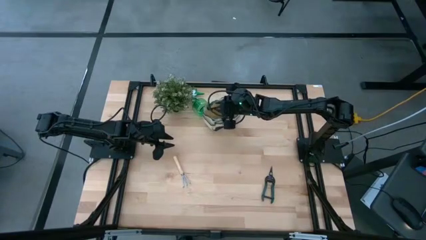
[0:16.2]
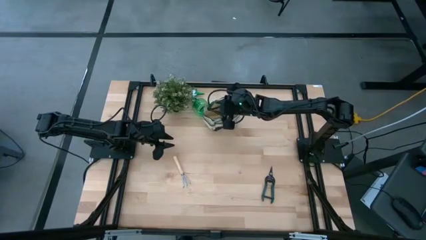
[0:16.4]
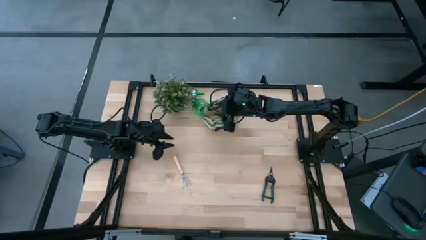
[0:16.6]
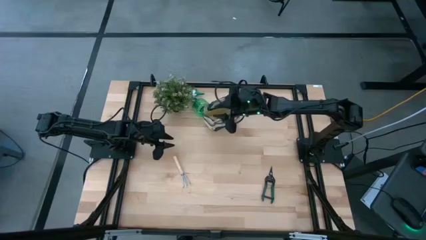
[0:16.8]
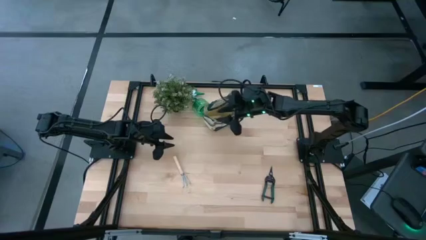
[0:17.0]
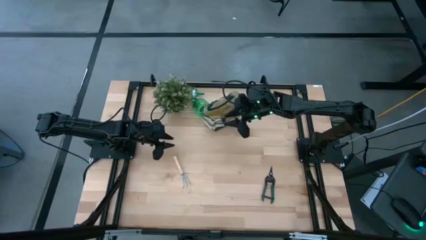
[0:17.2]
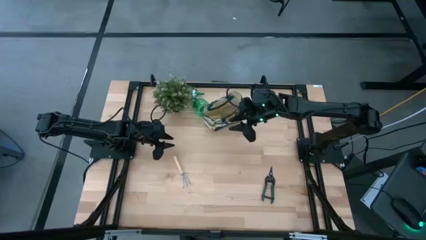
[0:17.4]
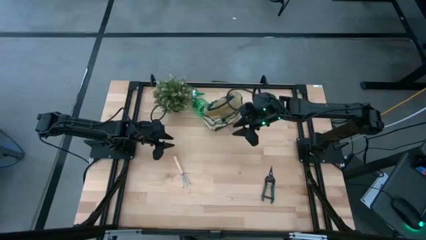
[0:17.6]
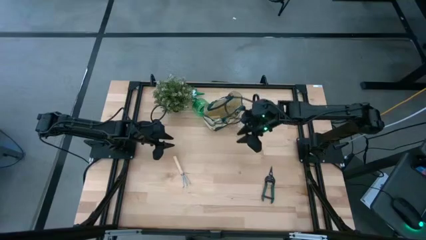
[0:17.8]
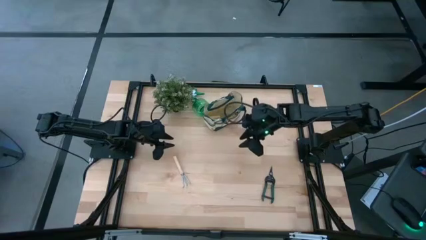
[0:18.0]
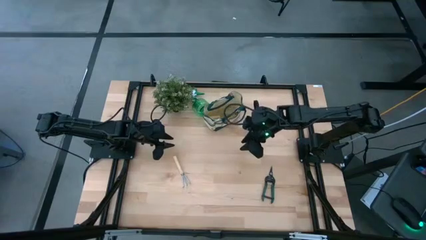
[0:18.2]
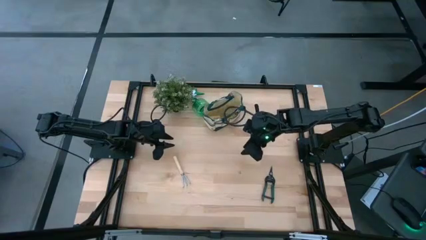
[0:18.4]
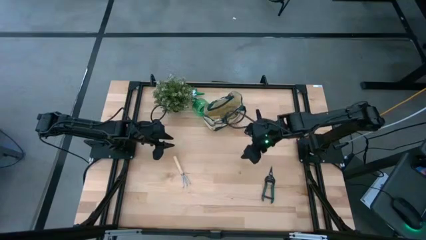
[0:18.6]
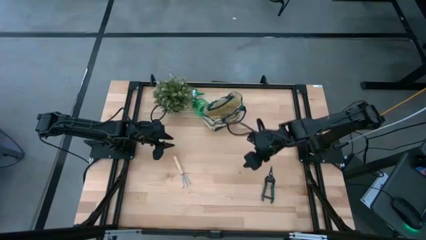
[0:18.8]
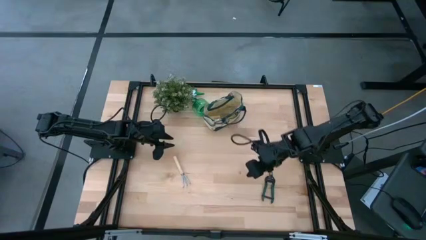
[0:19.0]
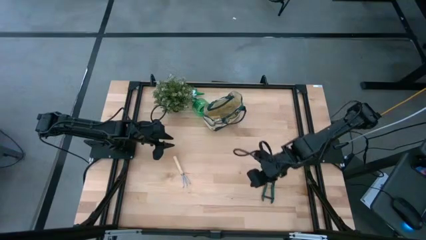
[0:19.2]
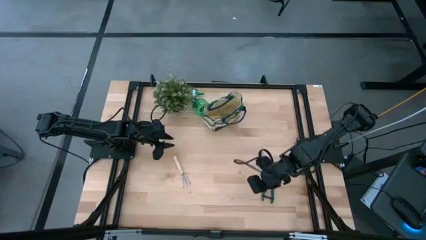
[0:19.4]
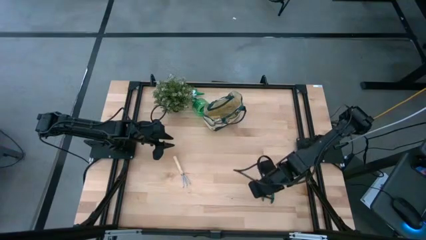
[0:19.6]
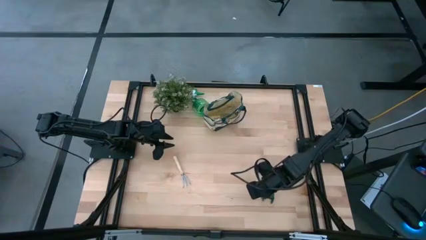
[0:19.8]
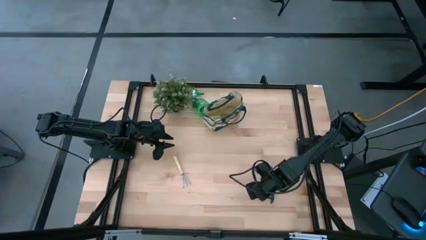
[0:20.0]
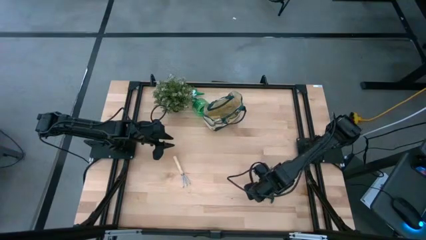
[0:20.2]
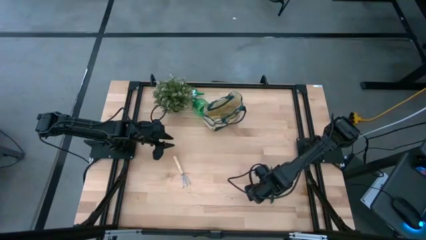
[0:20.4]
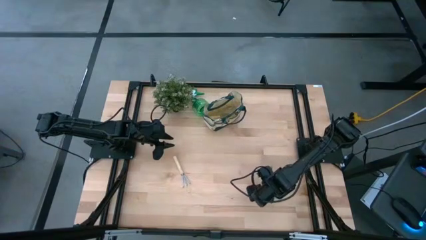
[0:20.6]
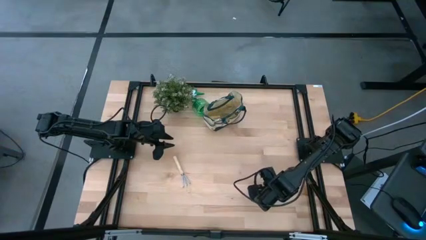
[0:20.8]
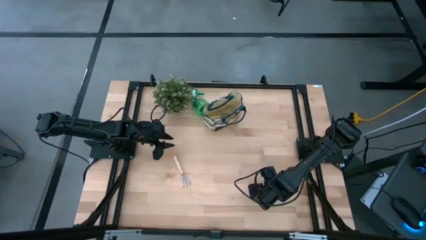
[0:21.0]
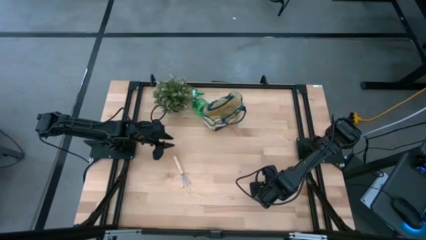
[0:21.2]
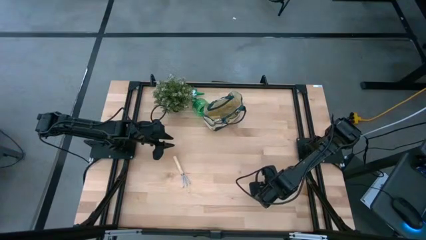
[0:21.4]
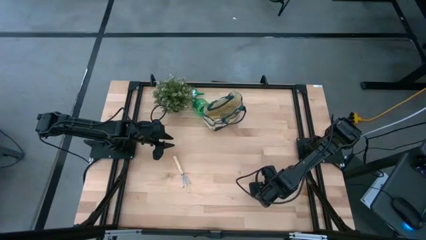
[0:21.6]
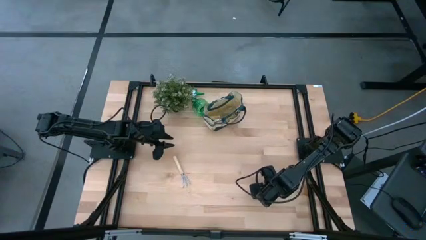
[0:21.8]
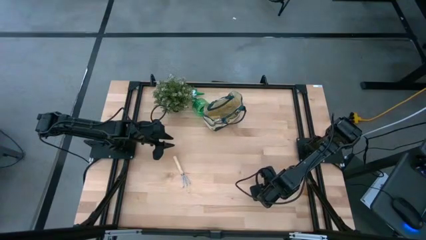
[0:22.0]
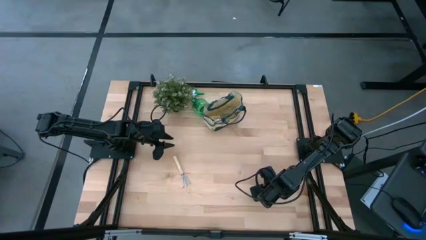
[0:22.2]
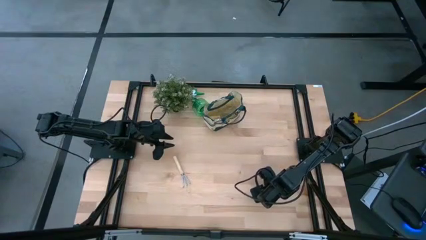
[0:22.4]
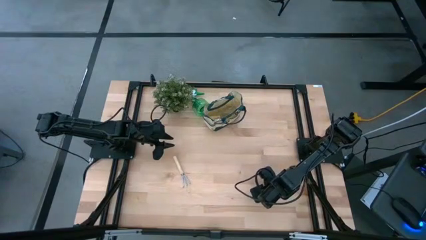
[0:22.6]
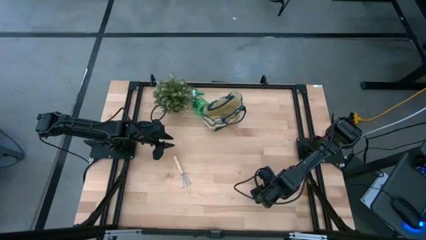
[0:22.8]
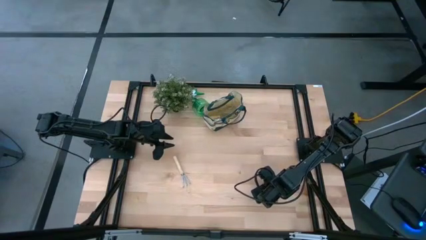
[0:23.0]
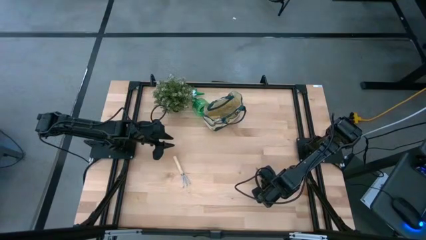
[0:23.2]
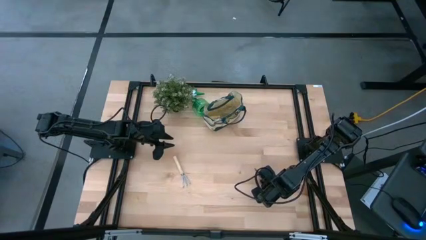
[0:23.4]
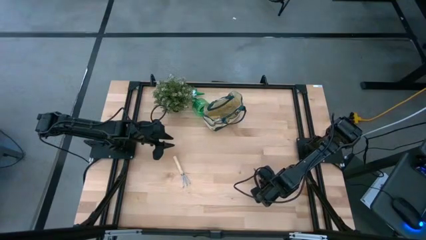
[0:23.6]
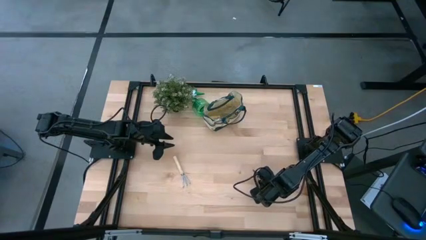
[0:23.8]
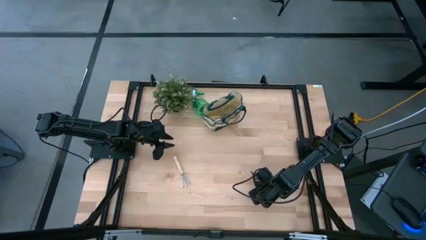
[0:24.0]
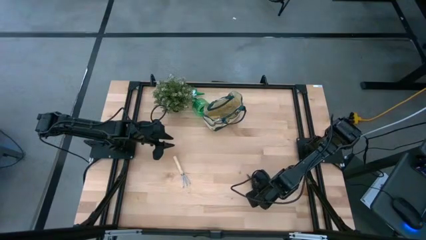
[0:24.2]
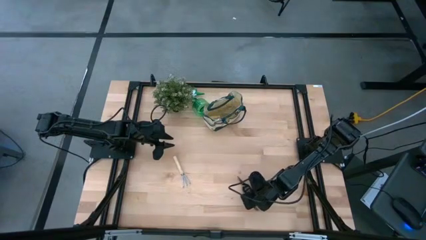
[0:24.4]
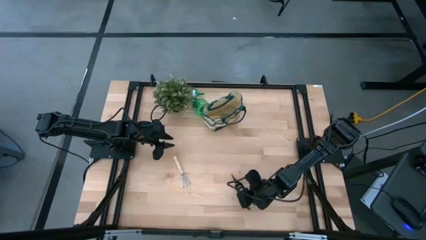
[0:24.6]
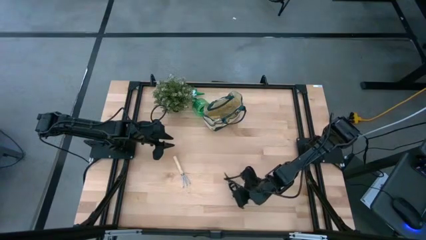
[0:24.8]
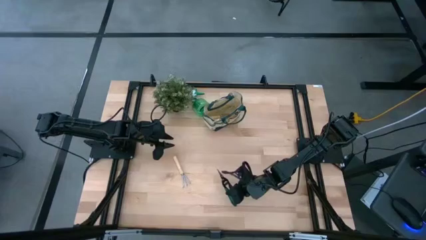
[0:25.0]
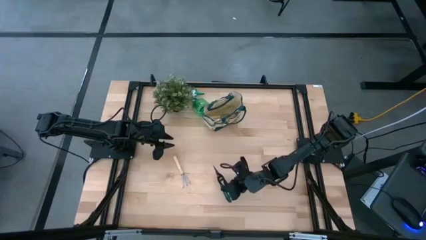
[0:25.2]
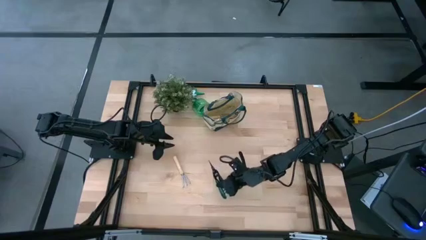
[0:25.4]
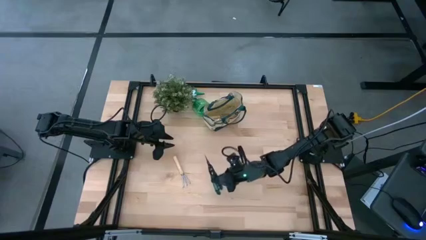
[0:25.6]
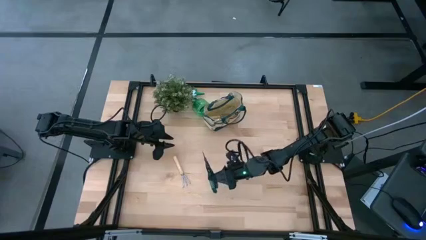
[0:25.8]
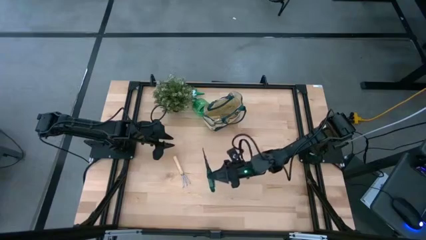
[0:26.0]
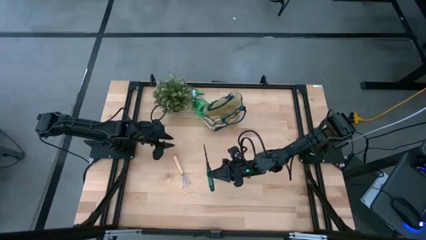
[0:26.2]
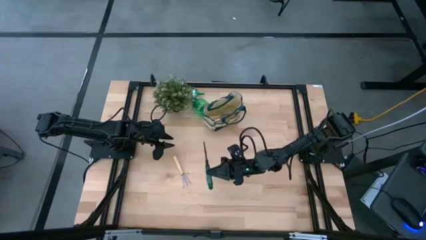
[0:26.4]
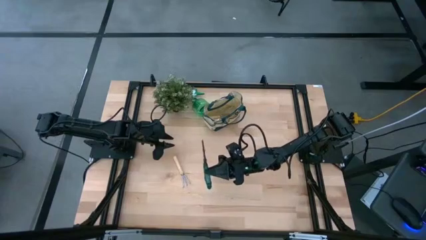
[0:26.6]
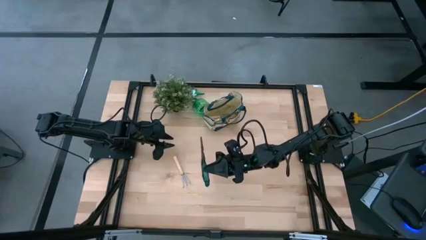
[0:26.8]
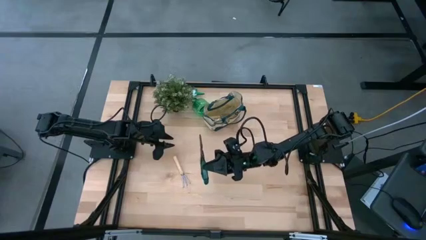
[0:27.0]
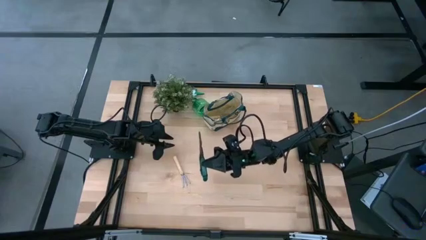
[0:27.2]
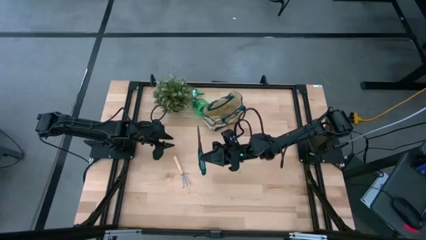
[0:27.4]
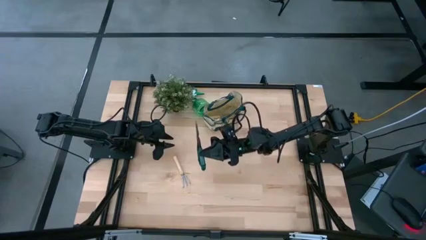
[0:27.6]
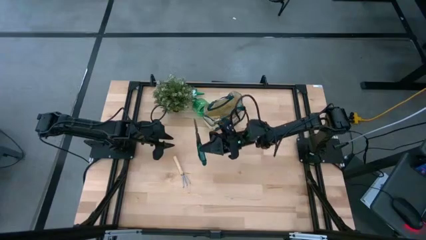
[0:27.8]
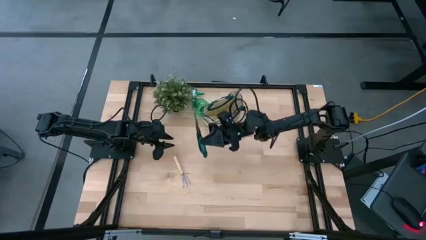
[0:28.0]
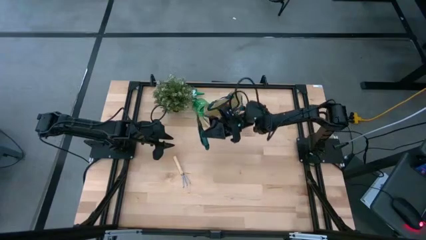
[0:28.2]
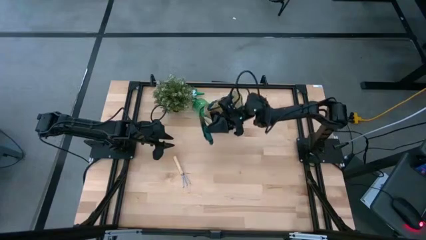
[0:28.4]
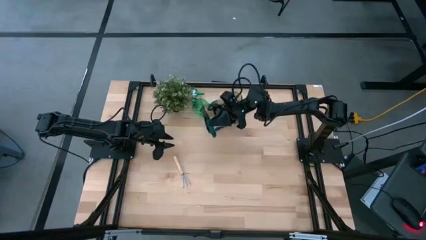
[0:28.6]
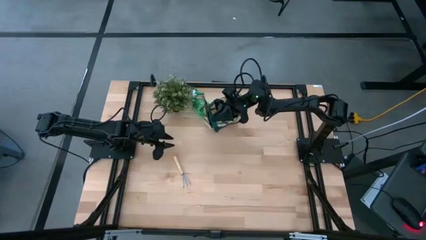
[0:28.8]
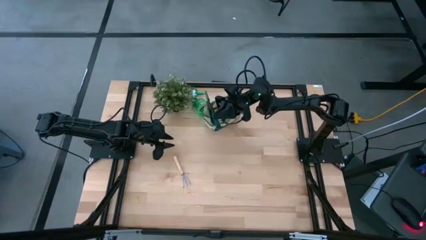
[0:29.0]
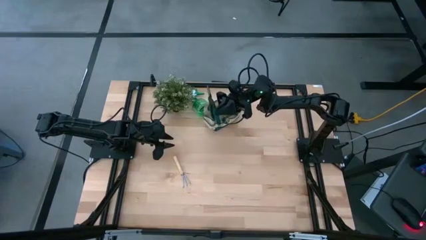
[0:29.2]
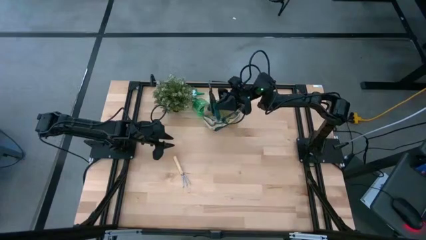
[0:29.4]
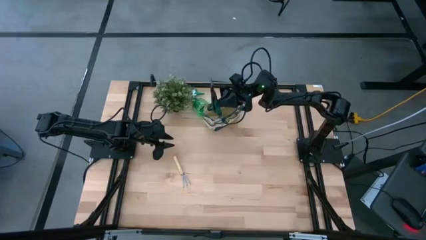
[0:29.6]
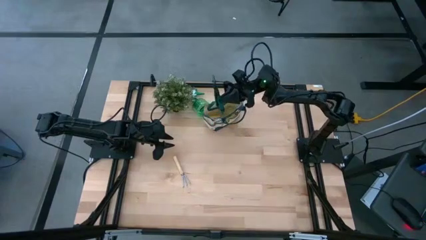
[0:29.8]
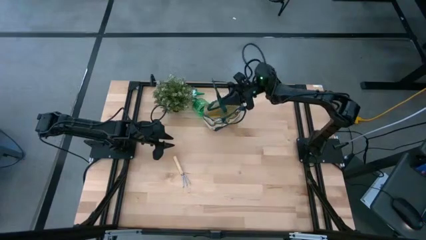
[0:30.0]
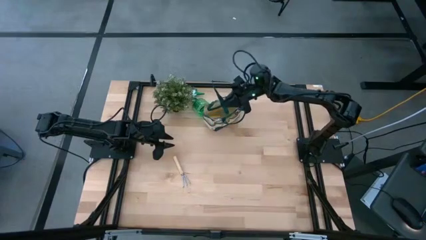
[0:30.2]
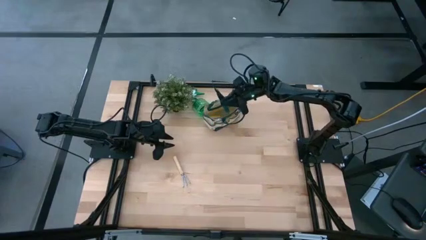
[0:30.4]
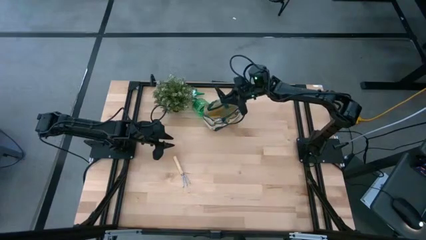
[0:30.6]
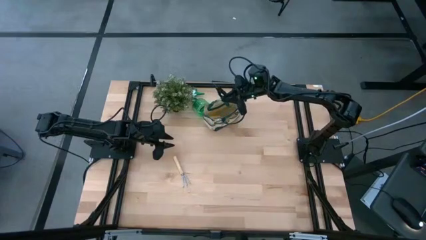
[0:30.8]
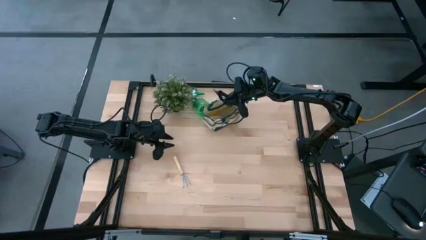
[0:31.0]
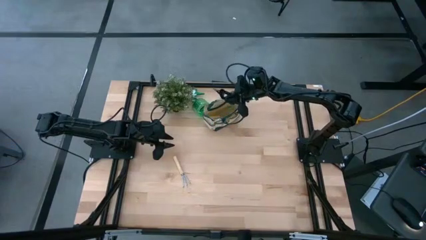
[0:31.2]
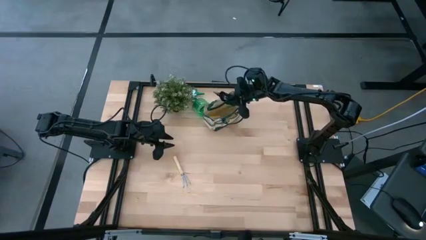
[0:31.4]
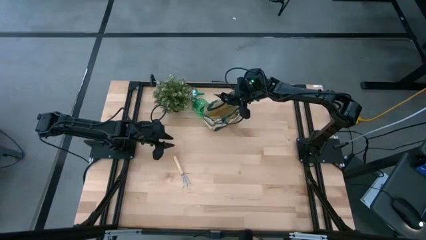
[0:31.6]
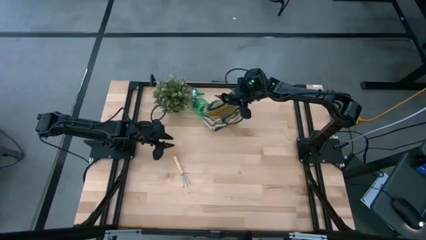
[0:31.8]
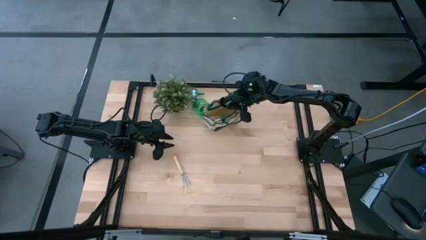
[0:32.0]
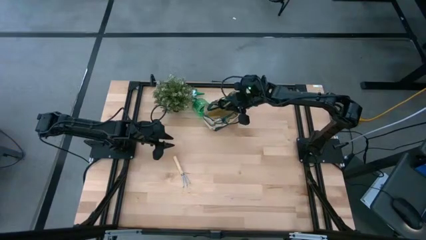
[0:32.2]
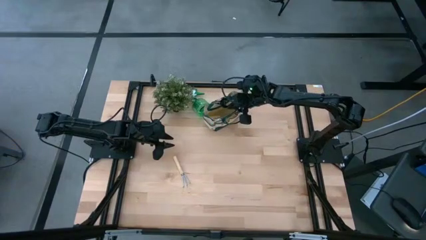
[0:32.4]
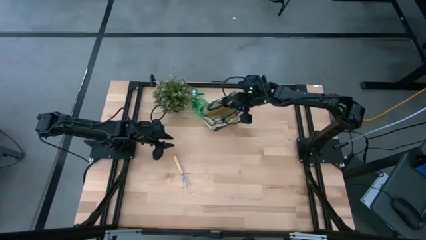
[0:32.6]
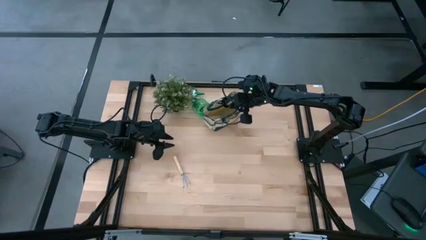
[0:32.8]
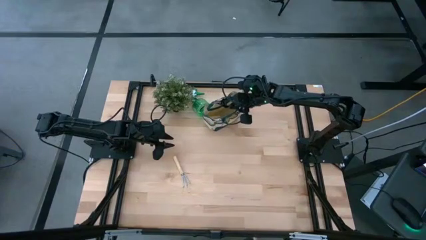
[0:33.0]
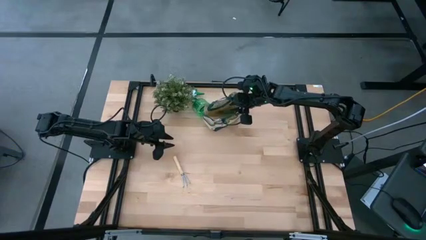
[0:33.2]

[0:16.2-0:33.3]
Task: Pick & Place Garden tools in Gardening bag
Put the fruit pruner into the gardening bag
